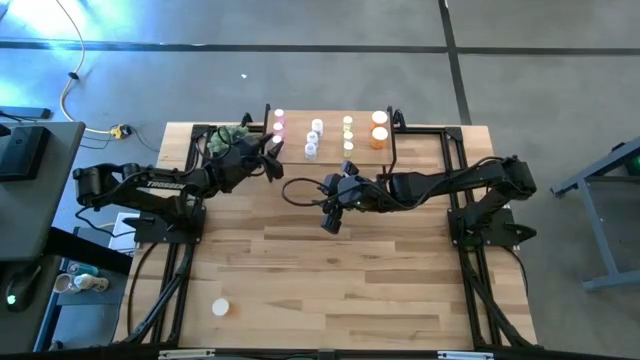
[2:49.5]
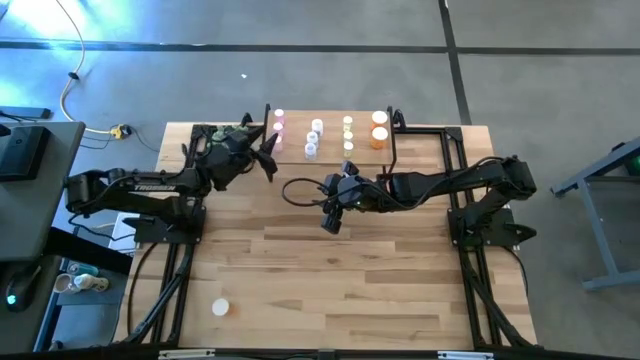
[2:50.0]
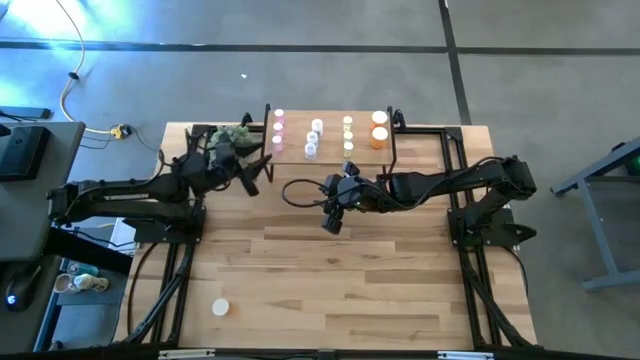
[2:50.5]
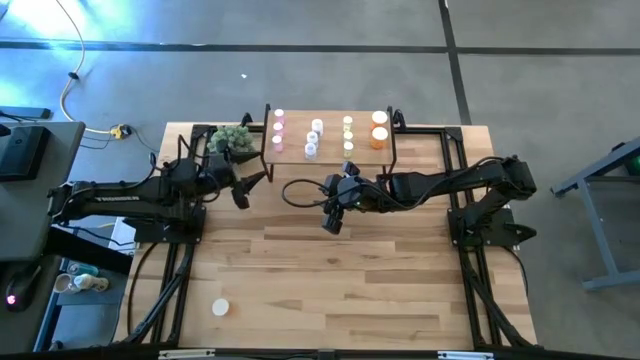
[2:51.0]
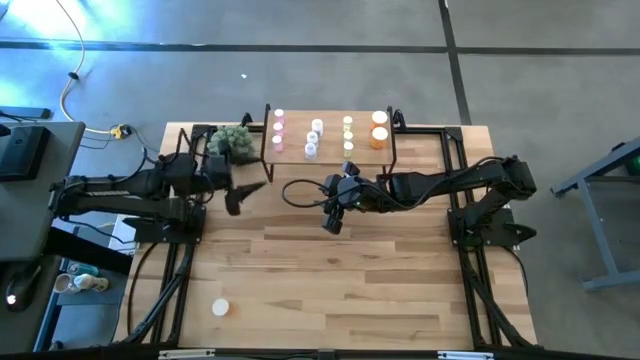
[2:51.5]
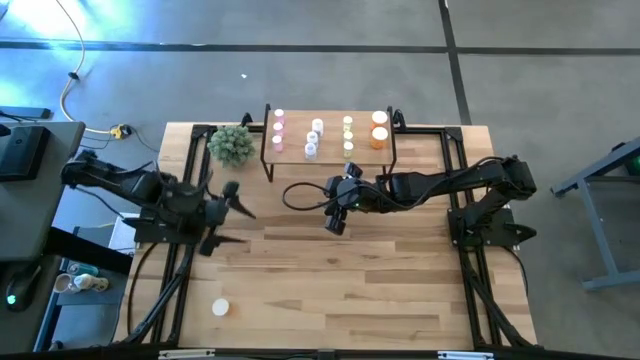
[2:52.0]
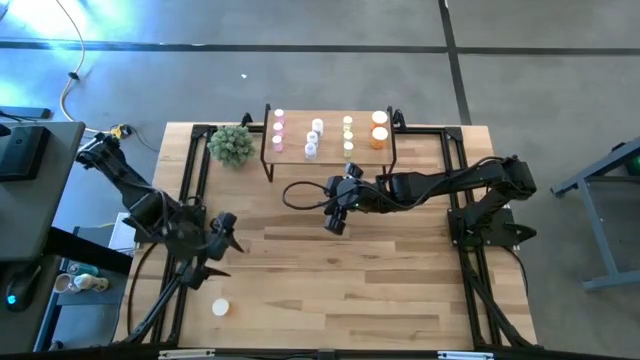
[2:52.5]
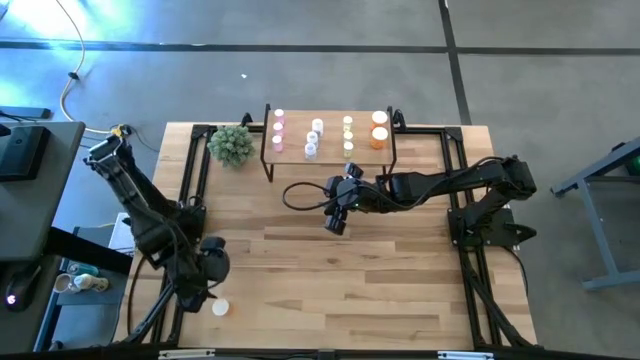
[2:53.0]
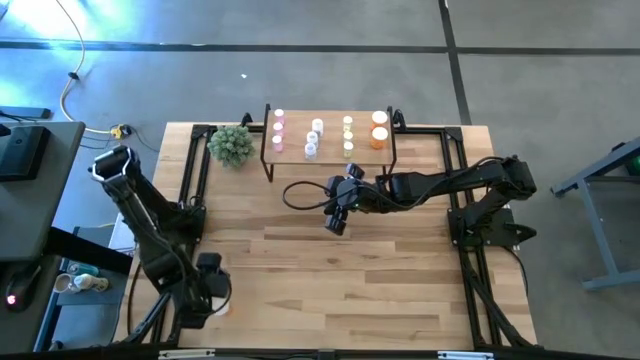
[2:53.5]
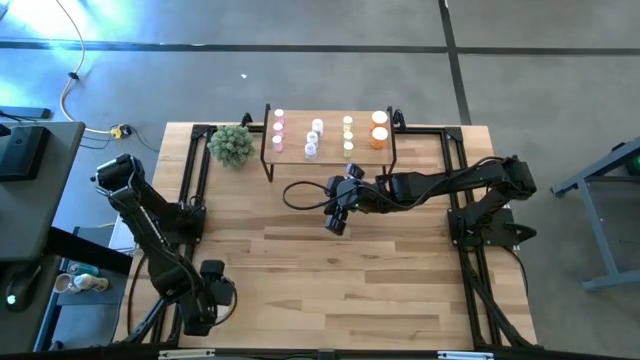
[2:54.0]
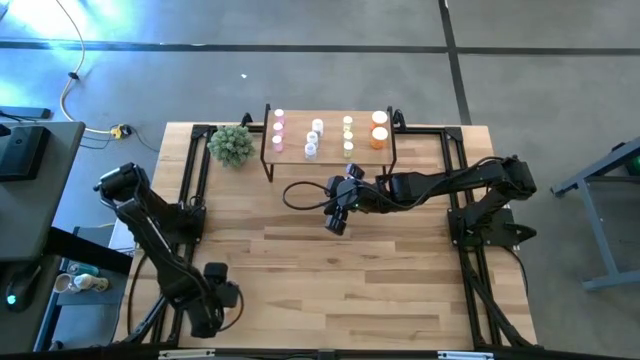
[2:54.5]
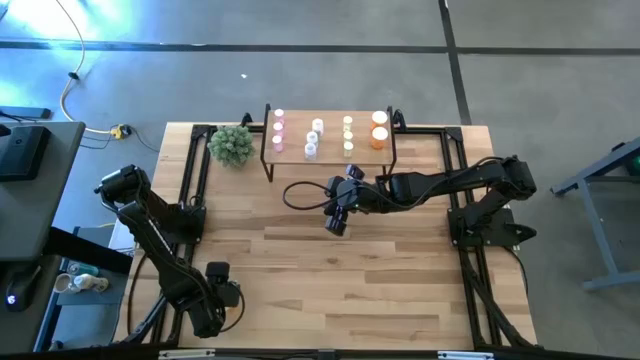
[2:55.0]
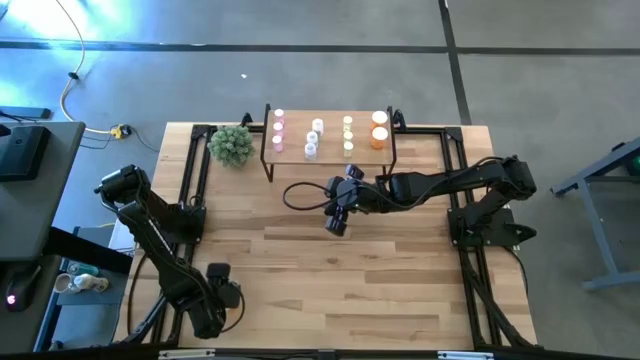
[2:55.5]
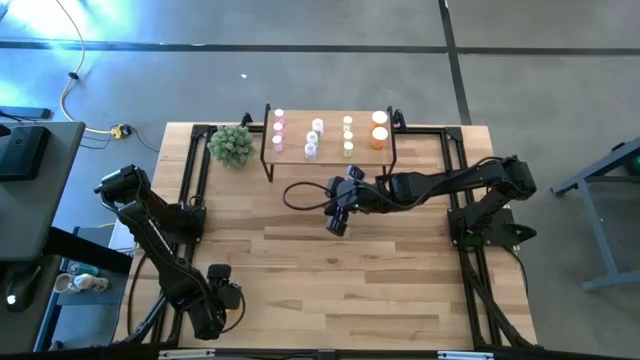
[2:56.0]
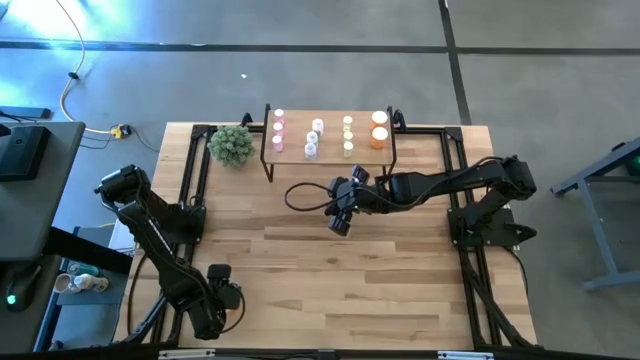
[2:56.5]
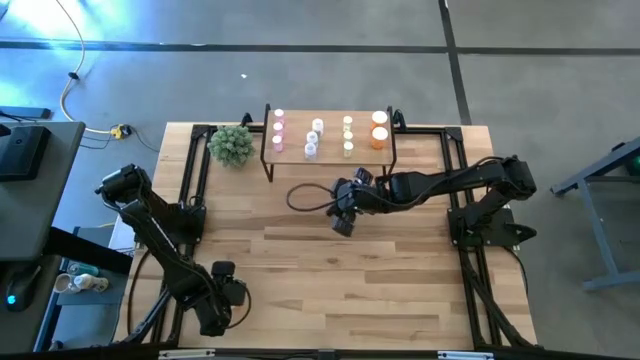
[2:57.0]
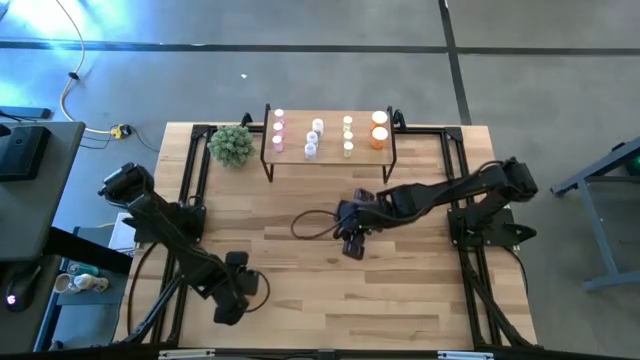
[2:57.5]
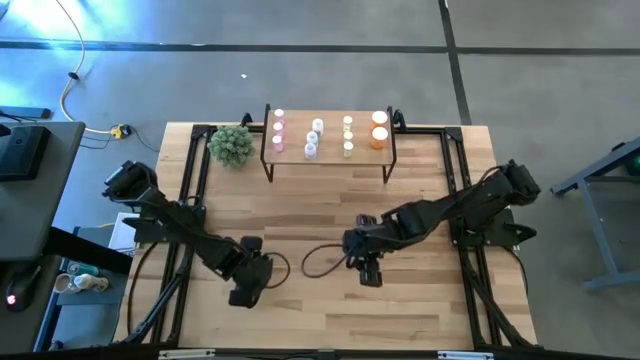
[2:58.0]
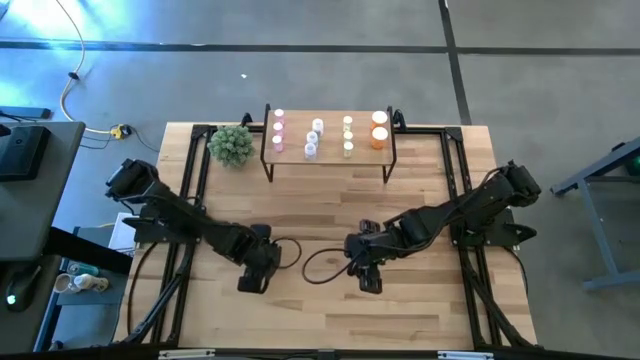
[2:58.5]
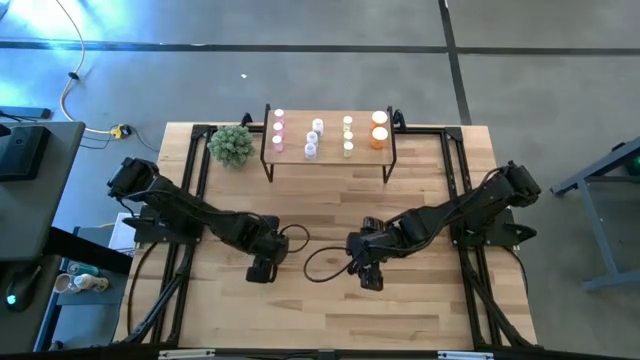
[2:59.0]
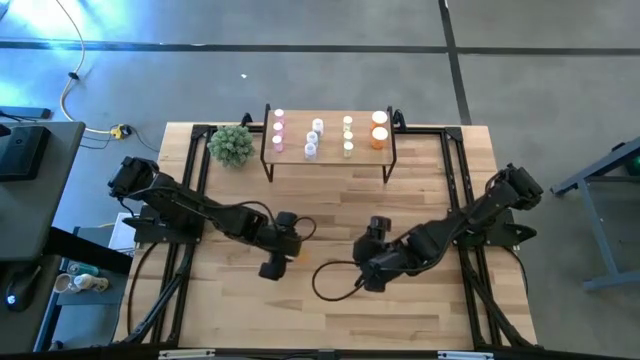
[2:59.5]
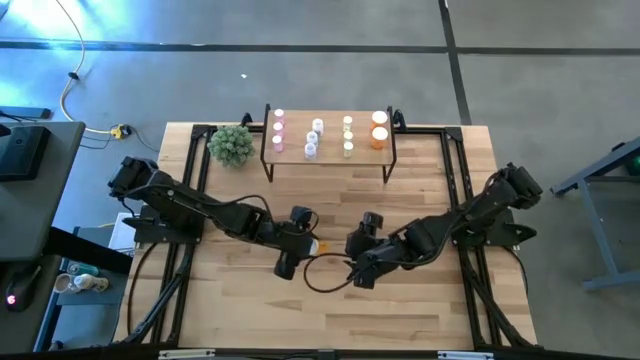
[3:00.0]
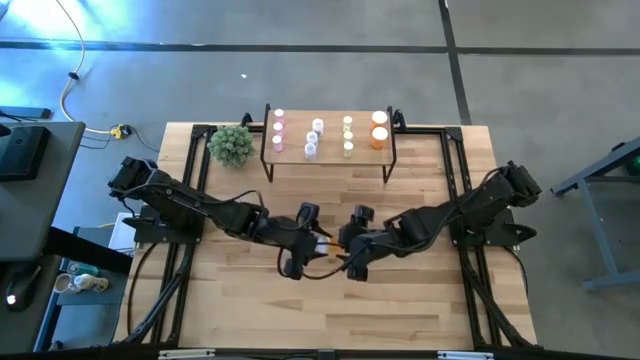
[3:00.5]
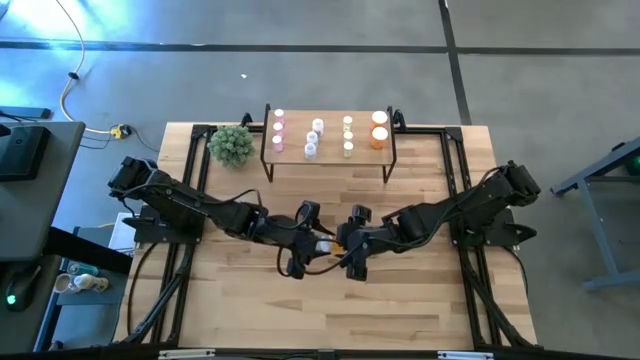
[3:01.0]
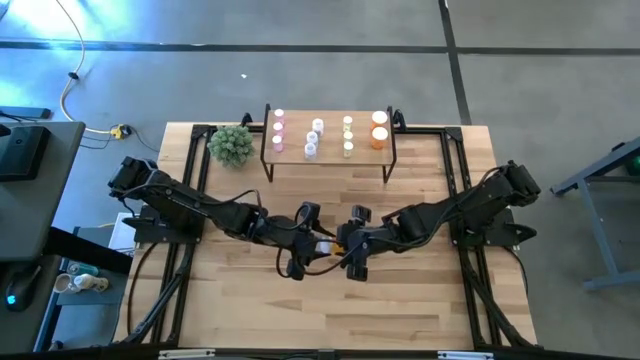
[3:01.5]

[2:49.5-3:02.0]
Task: Pick and place medicine bottles onto shelf by color
Put the orange pill bottle on the shelf aligned with the other orange pill bottles

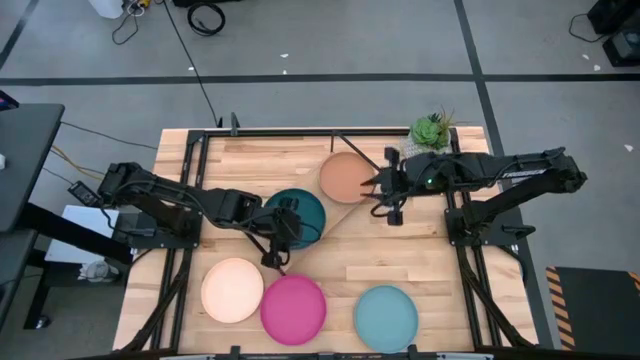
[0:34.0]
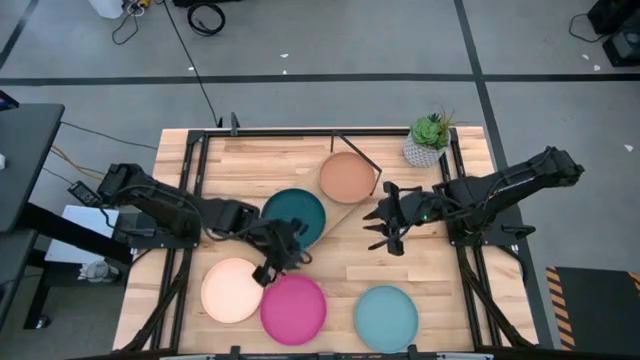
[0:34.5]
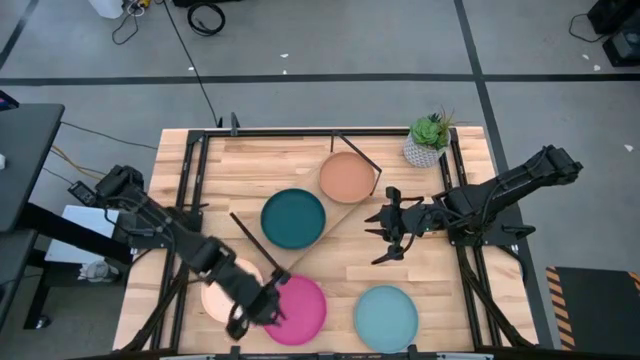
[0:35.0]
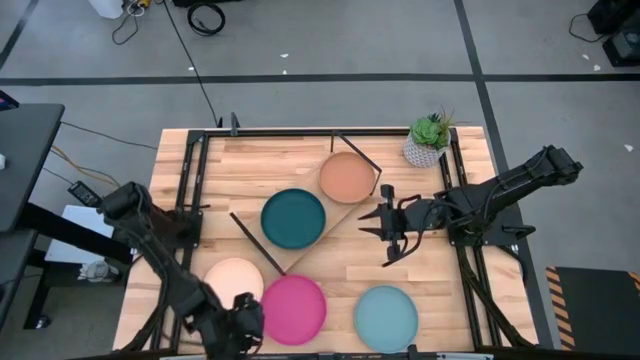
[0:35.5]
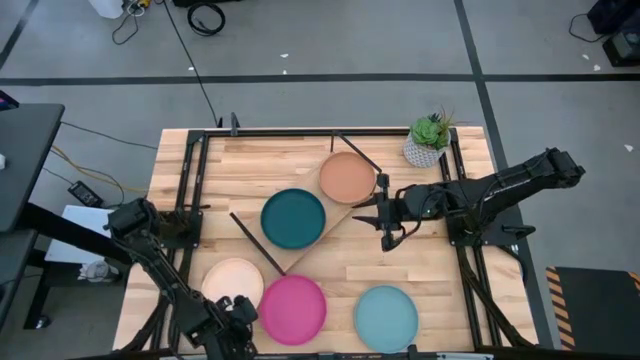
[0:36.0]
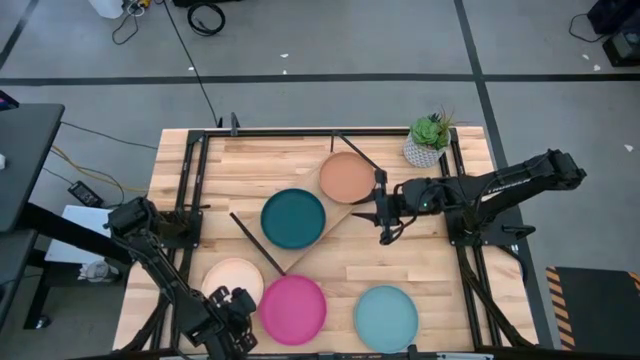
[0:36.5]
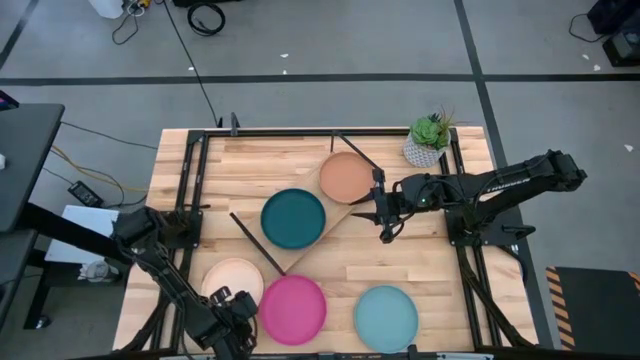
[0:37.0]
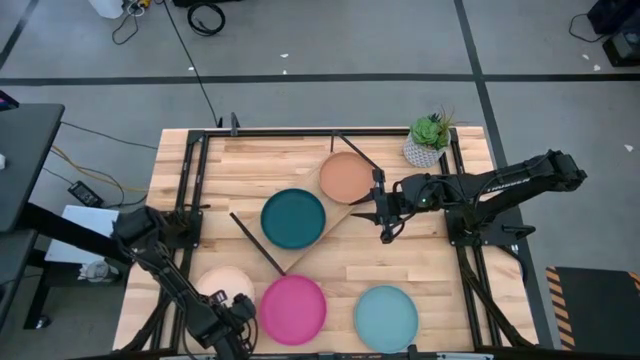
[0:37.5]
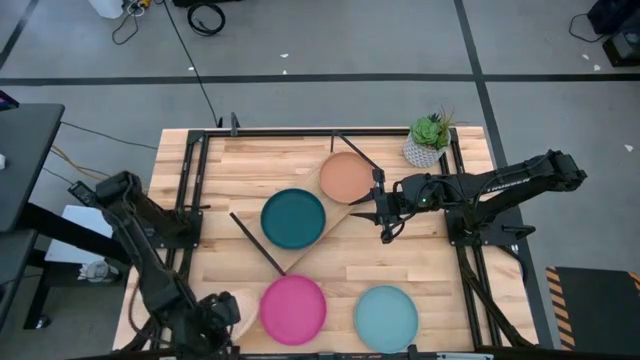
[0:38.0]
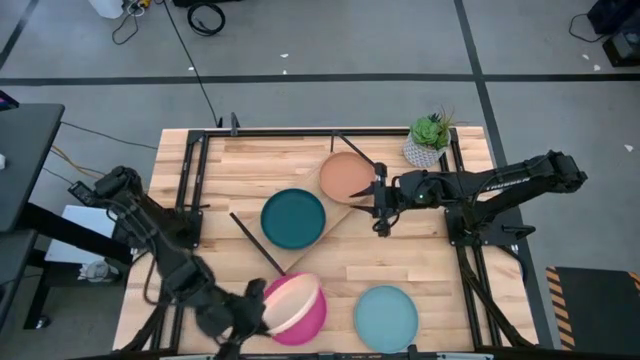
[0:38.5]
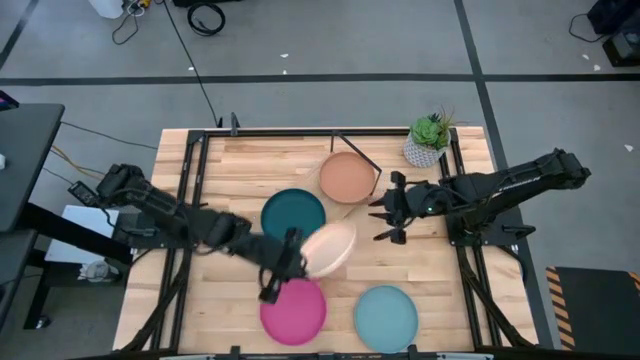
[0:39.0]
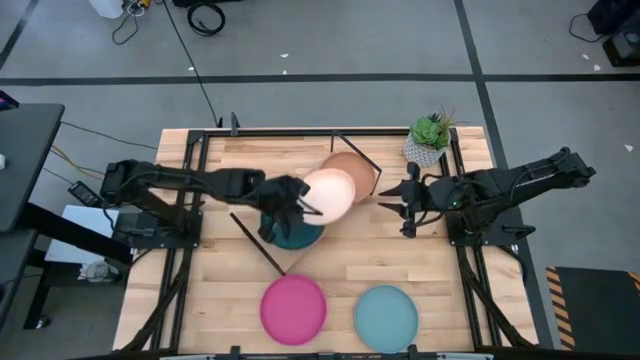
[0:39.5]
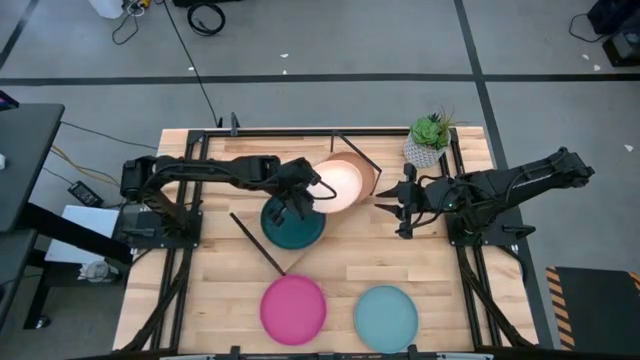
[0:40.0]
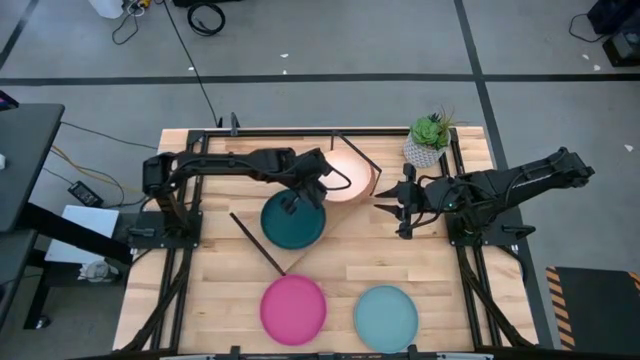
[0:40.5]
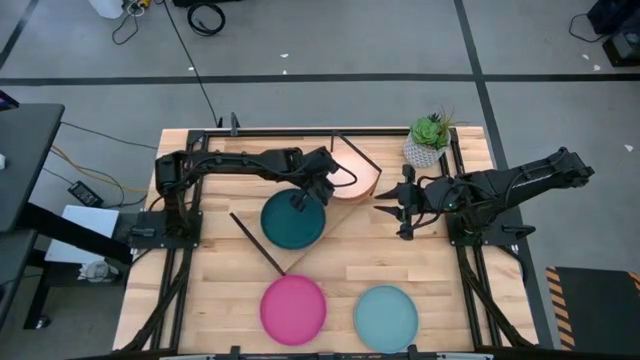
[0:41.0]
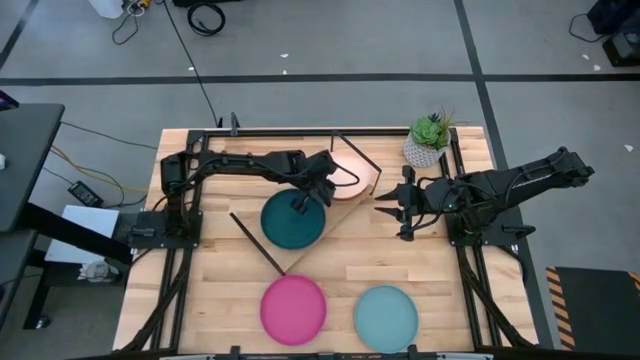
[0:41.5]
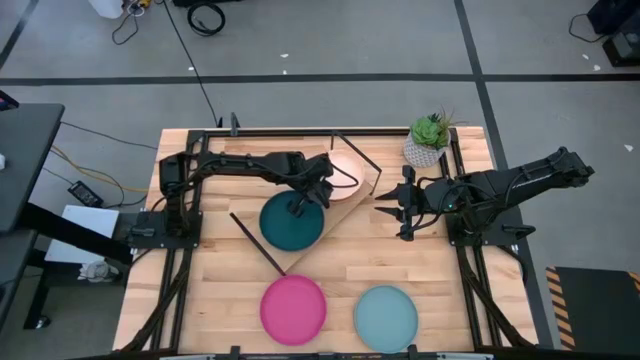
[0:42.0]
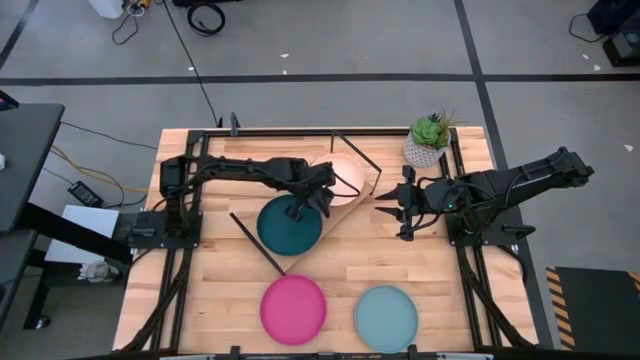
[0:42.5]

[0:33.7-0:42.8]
Task: Place and stack plates onto a shelf
Stack the white plate on top of the brown plate on the shelf
